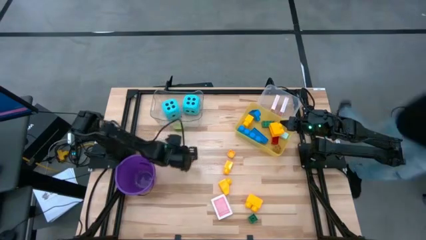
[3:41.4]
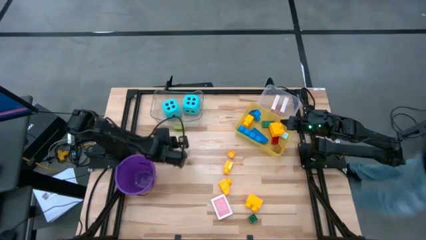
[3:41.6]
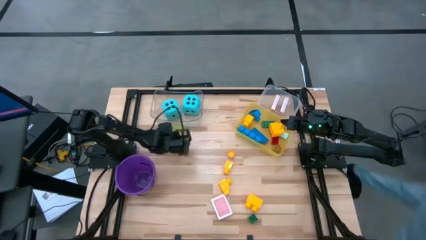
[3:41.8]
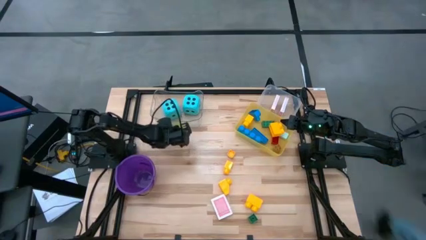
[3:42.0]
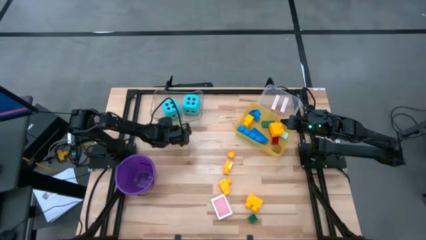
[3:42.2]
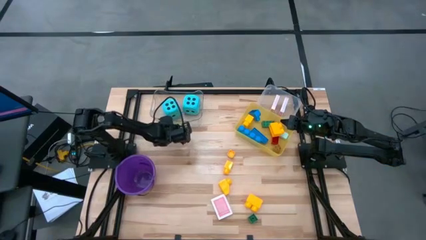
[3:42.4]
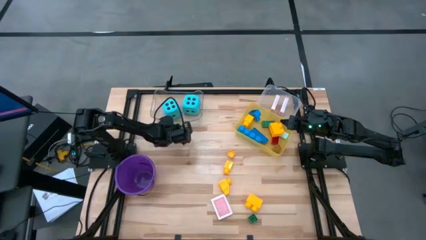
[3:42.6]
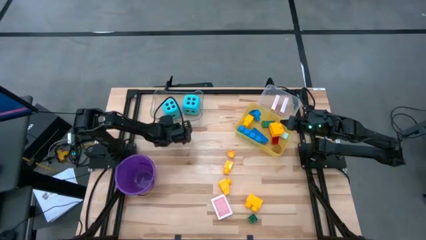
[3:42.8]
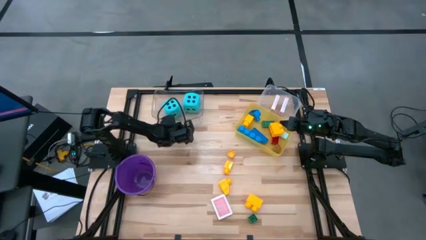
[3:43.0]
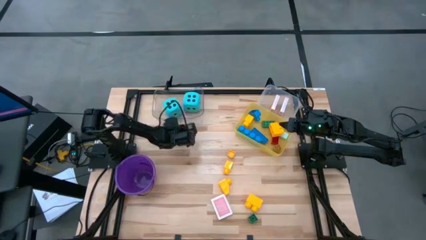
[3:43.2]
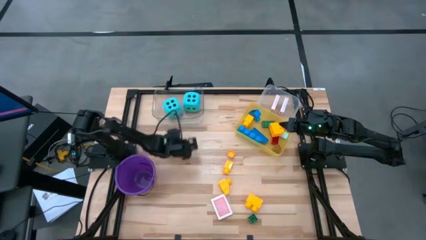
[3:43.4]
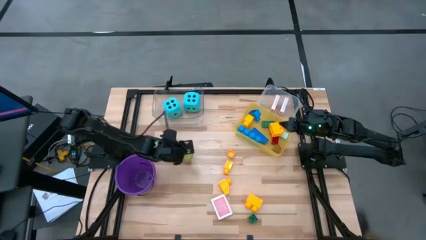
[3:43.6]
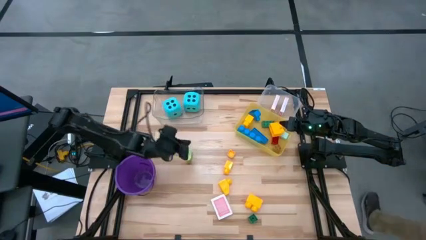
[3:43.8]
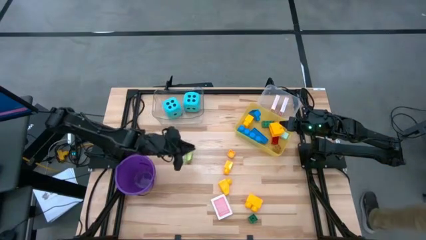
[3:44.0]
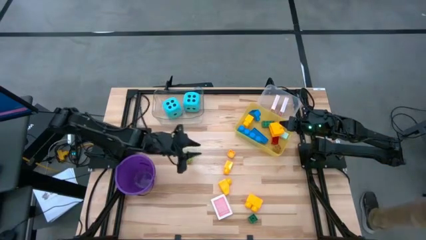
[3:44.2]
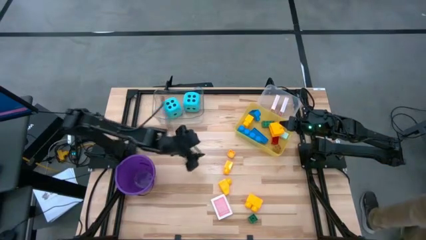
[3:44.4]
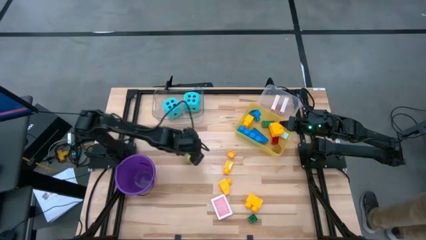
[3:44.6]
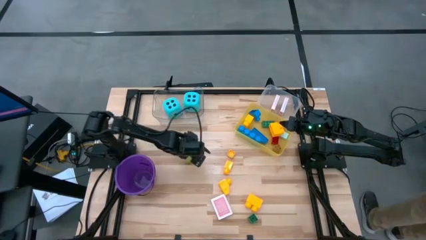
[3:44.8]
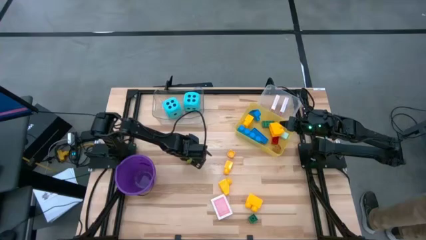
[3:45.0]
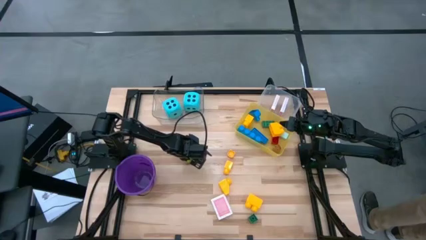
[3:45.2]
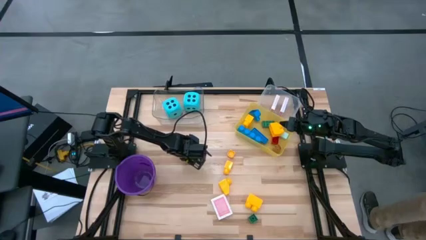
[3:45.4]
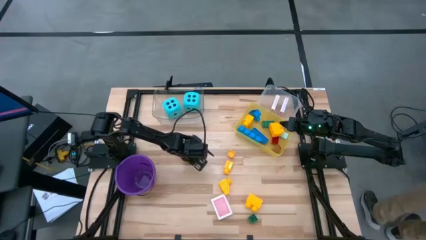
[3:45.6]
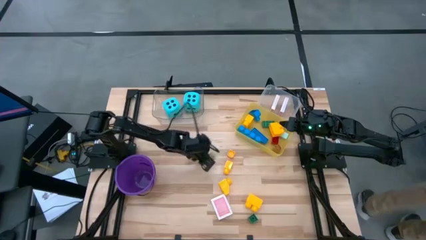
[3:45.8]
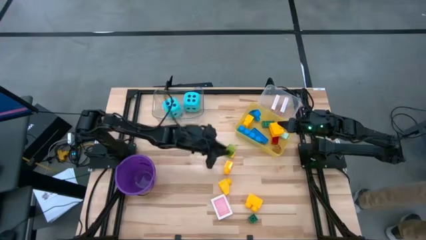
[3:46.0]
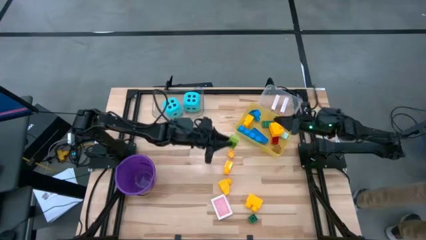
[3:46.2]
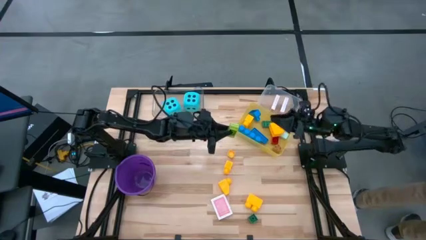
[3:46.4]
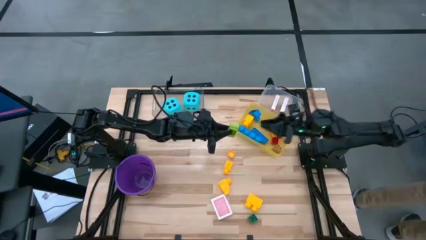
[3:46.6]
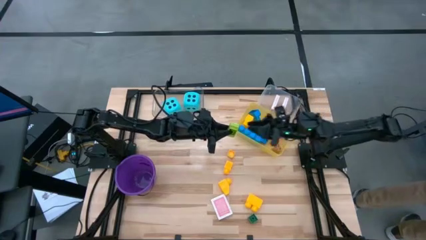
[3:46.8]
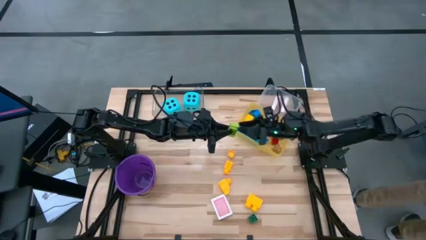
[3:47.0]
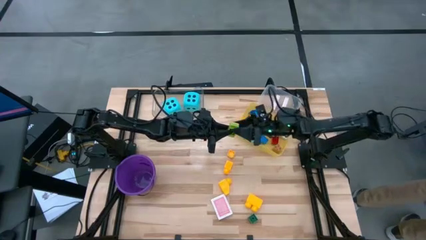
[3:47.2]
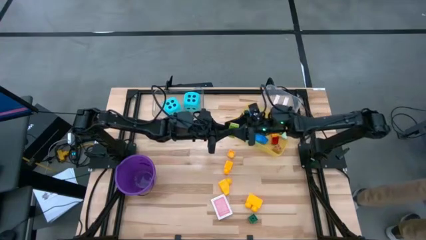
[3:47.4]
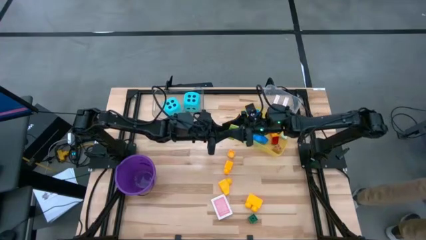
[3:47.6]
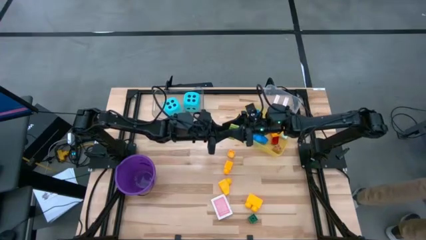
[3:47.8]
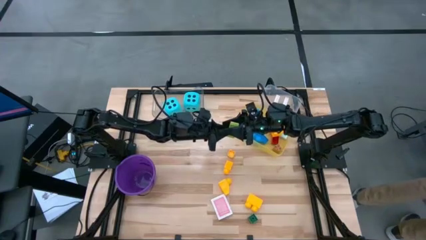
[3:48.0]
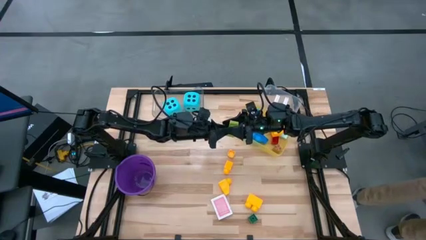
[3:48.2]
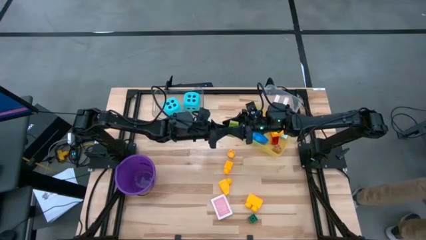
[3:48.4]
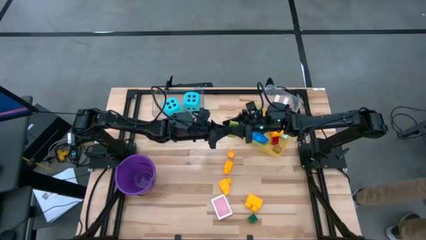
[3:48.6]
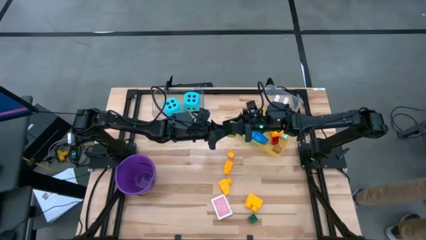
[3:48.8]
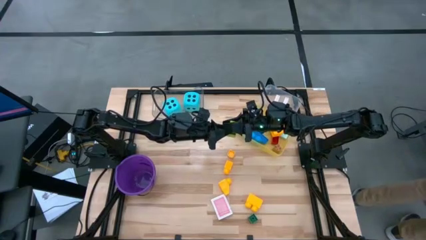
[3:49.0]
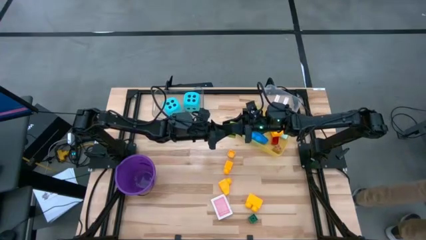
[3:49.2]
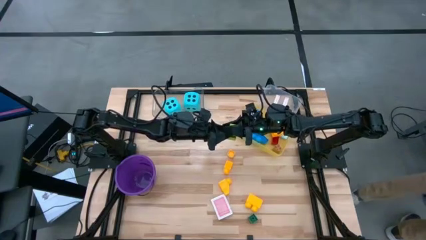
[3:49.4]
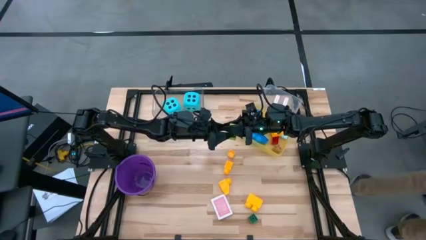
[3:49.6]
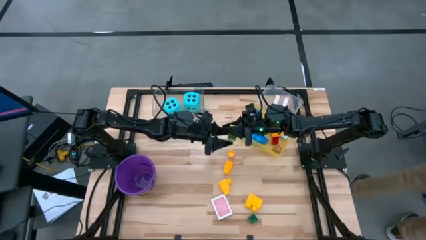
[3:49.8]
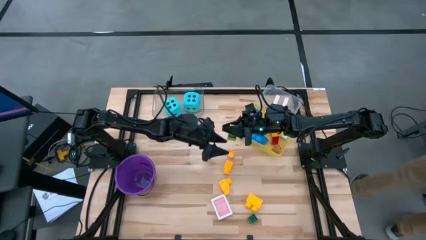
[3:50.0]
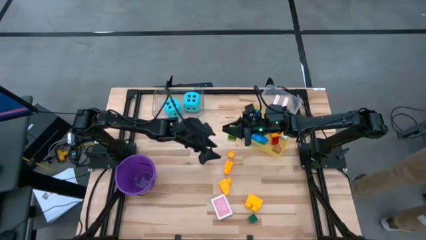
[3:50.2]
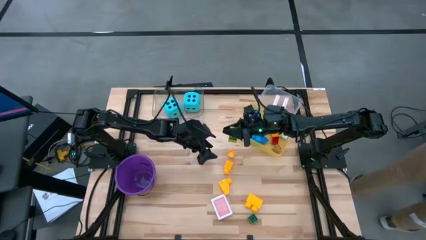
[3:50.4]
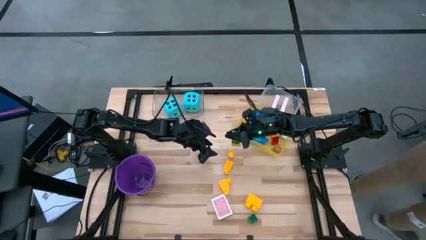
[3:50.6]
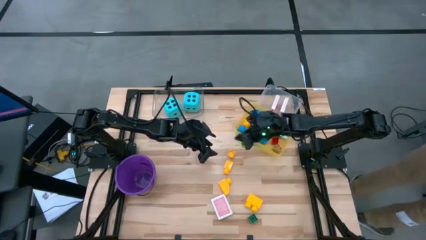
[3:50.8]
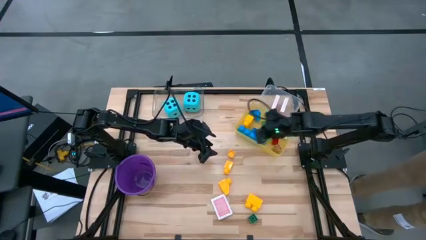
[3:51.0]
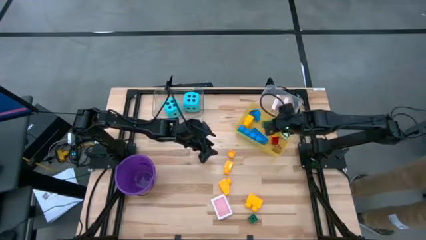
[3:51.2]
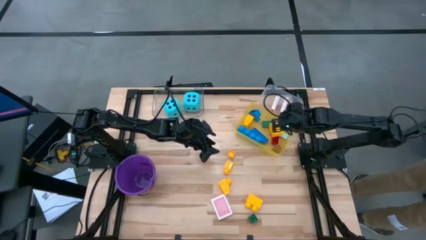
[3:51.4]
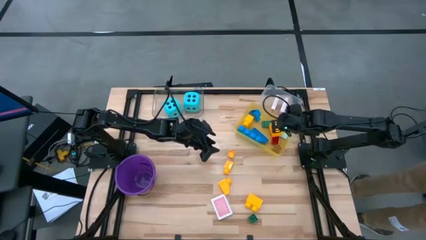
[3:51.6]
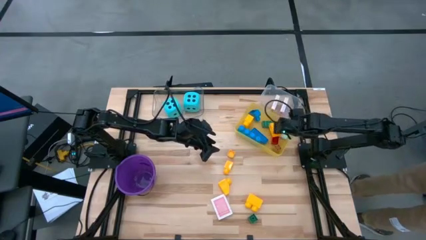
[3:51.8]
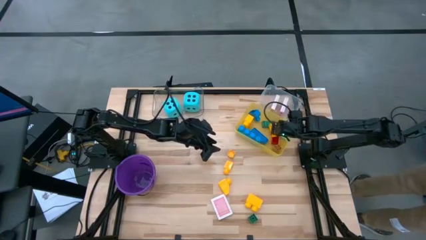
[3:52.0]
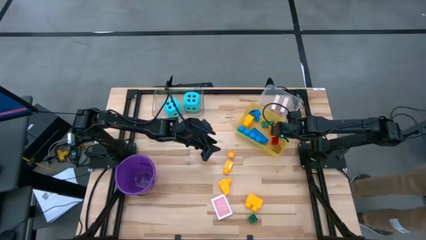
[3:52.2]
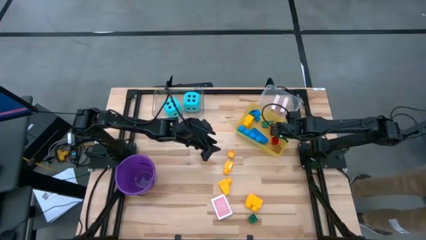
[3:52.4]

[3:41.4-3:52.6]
Task: Pick & Place Toys
Put the green game piece into the yellow bin

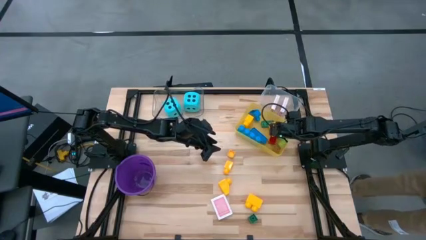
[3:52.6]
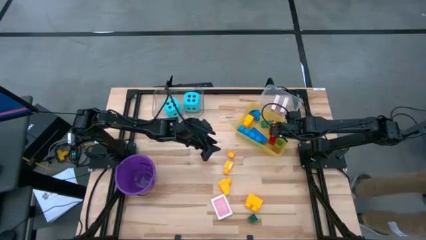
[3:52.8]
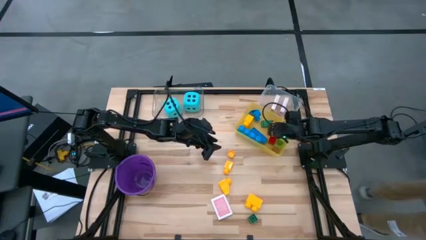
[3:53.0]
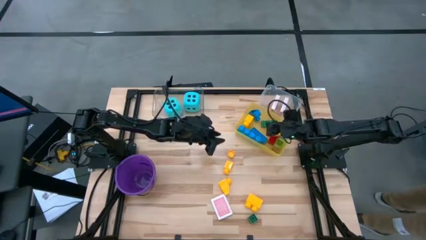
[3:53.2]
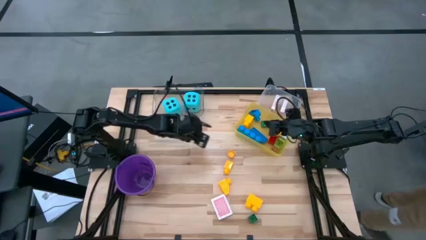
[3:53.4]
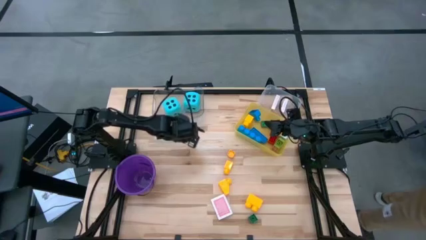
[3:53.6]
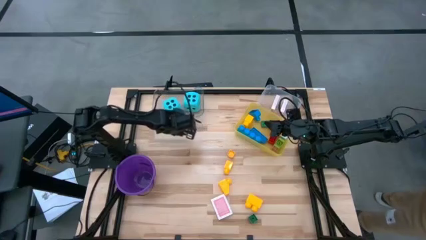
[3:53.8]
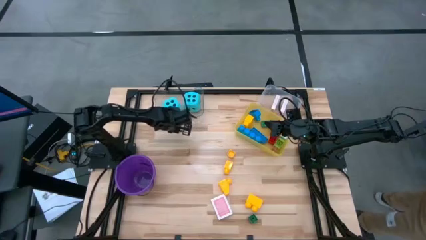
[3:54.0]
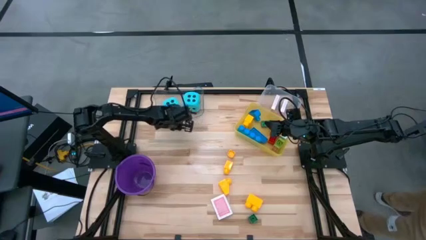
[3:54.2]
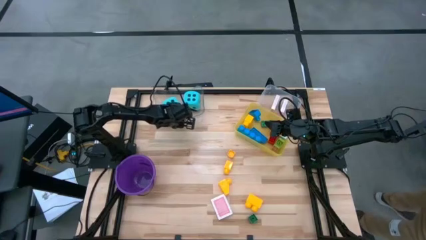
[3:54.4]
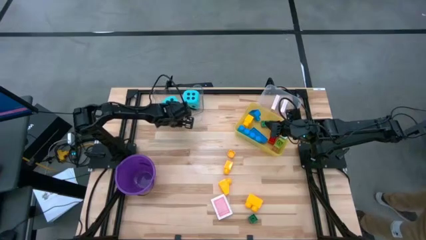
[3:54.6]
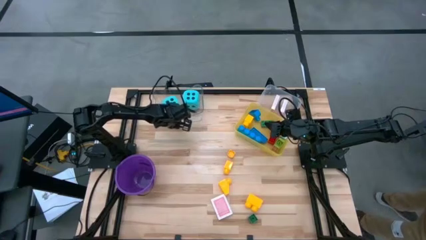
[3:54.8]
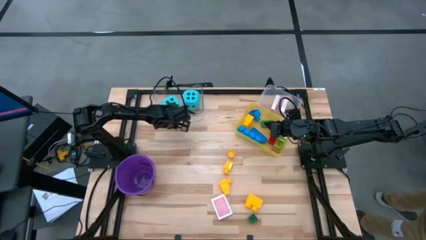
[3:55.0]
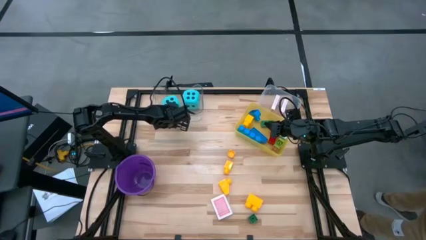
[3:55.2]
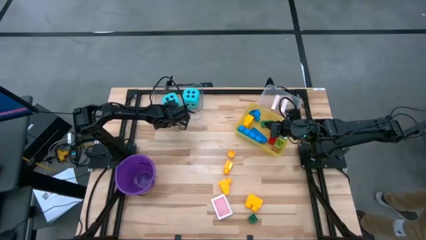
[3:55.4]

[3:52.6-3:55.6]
Adjust the transparent bin
